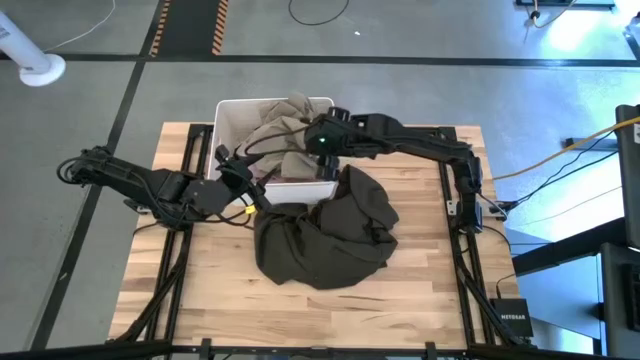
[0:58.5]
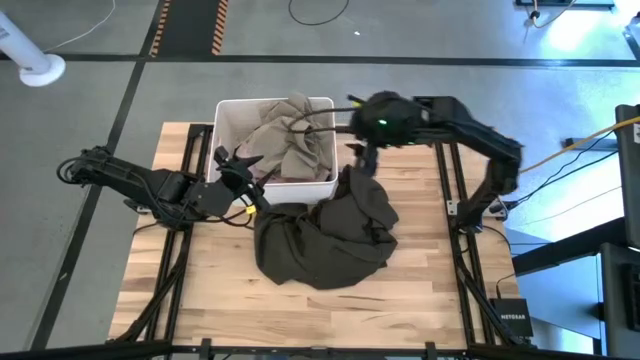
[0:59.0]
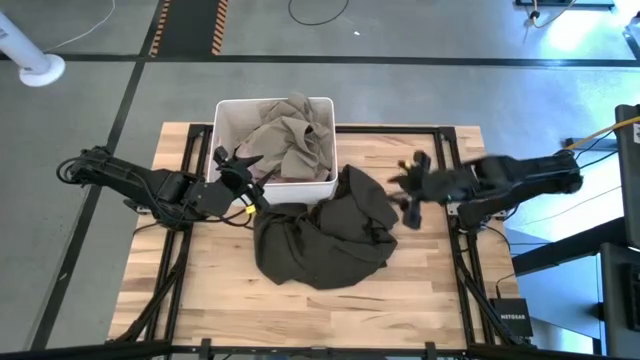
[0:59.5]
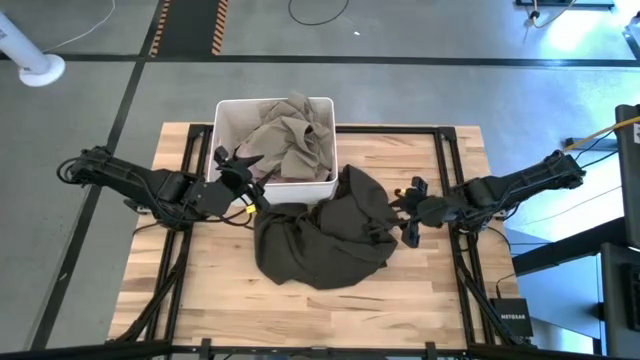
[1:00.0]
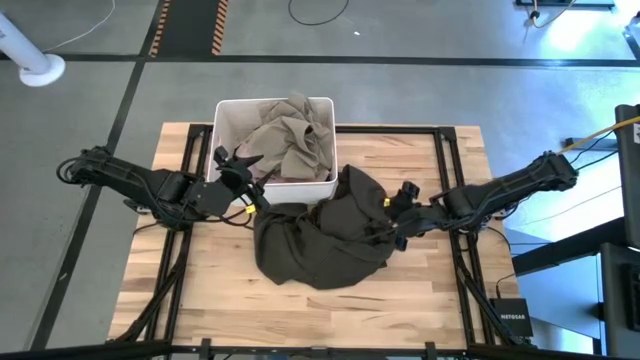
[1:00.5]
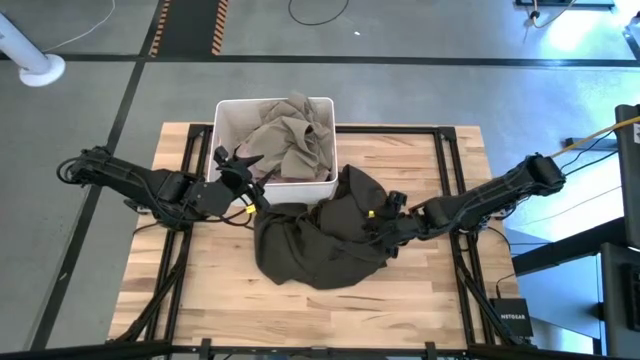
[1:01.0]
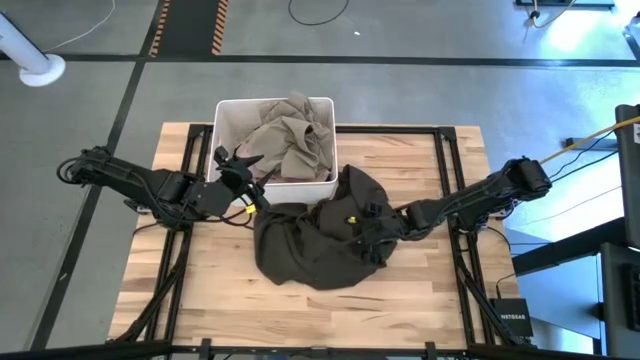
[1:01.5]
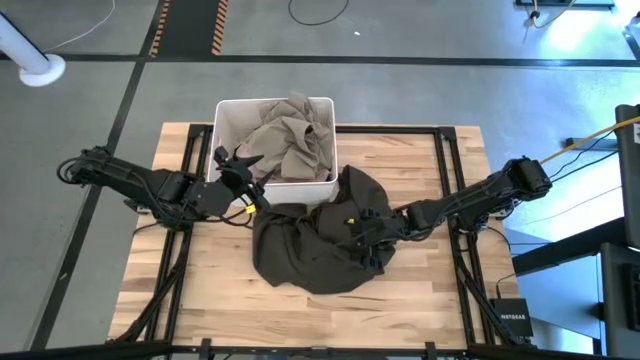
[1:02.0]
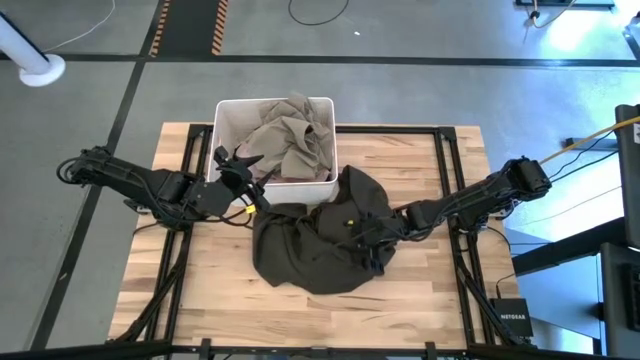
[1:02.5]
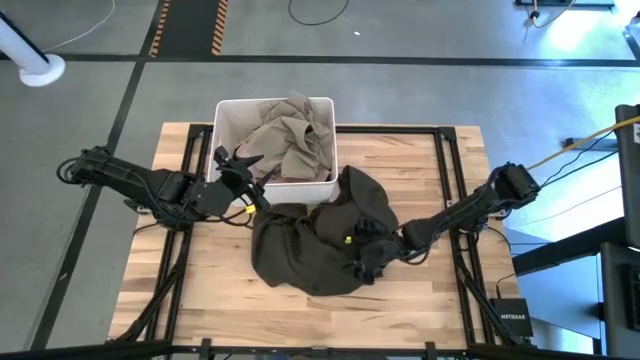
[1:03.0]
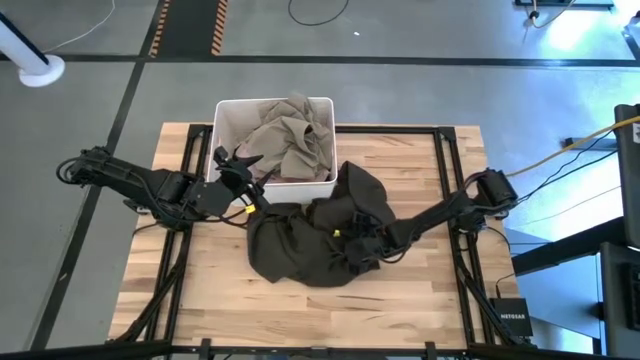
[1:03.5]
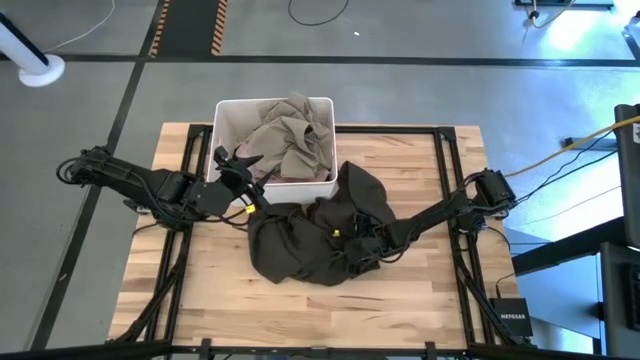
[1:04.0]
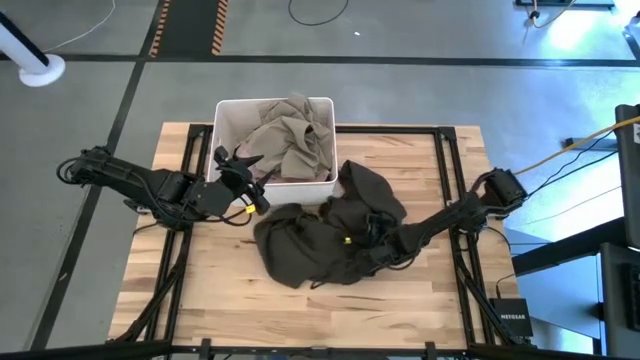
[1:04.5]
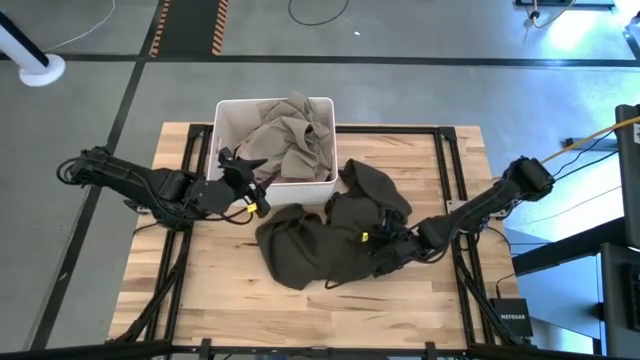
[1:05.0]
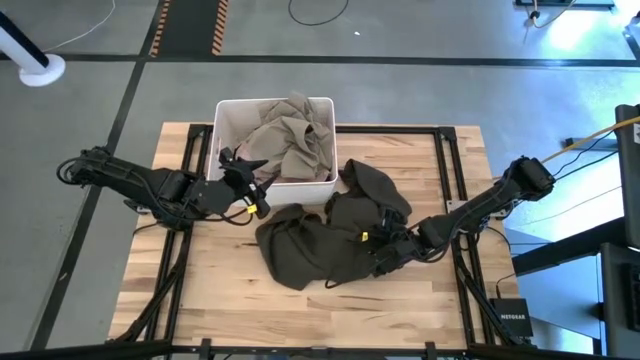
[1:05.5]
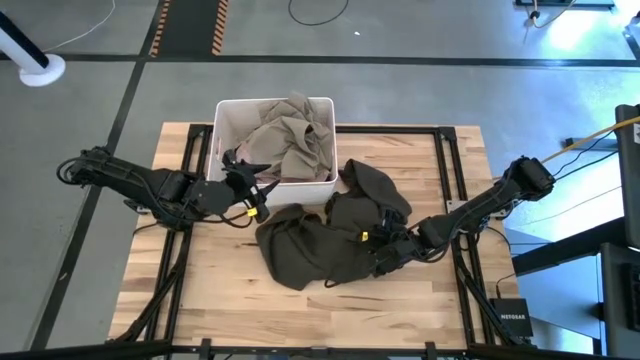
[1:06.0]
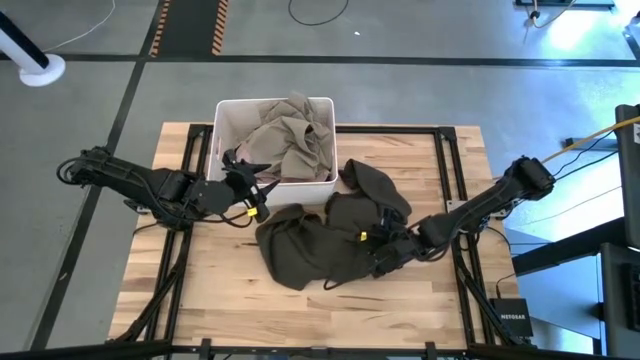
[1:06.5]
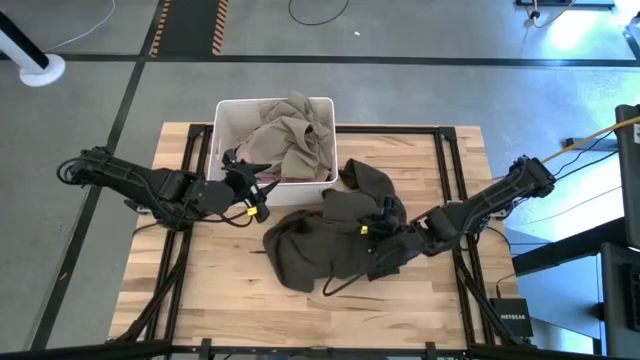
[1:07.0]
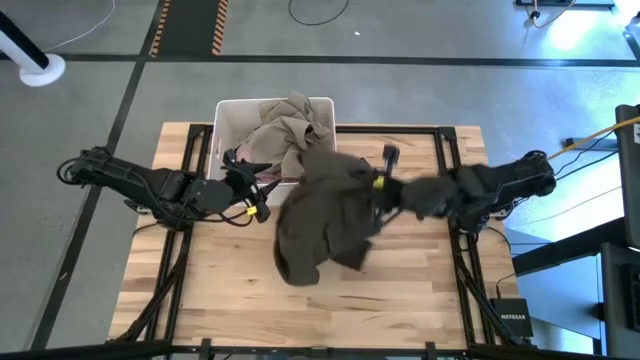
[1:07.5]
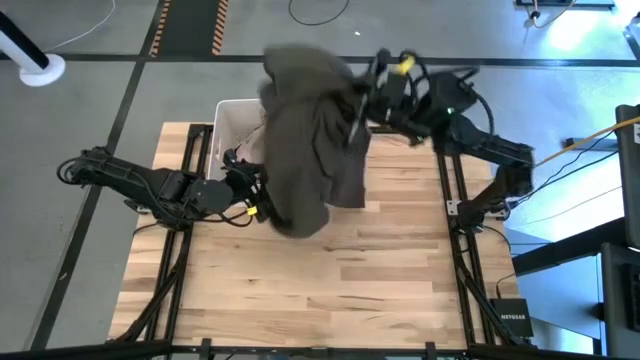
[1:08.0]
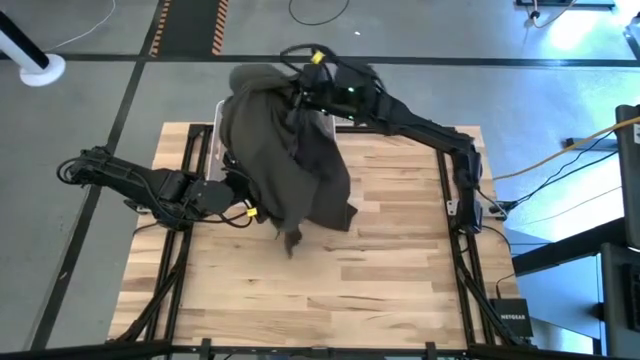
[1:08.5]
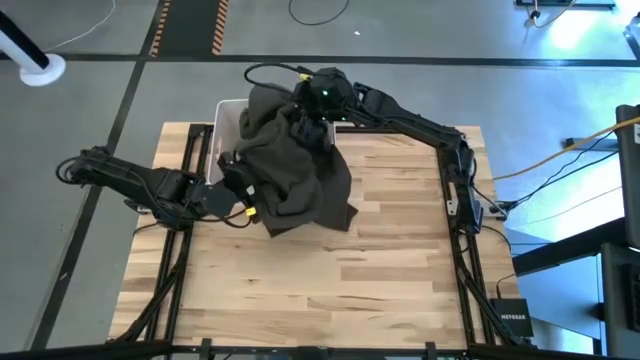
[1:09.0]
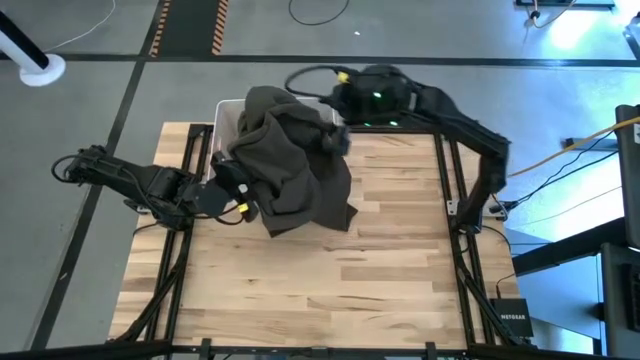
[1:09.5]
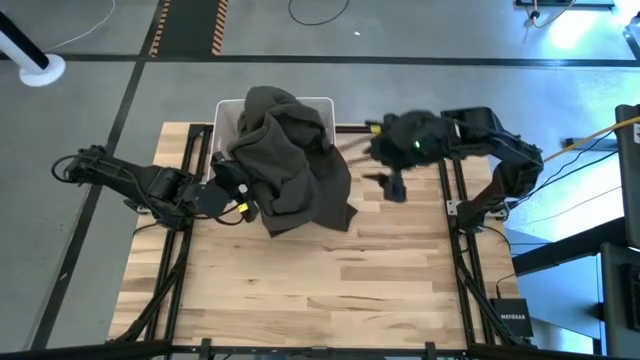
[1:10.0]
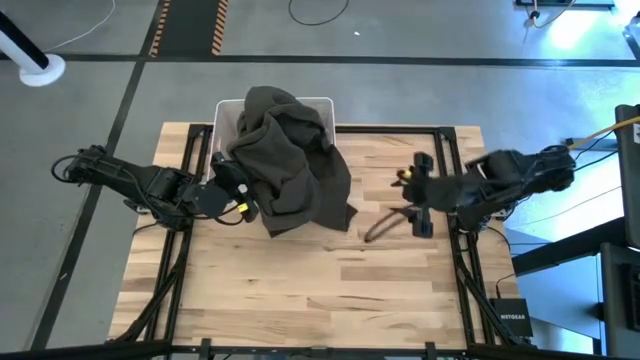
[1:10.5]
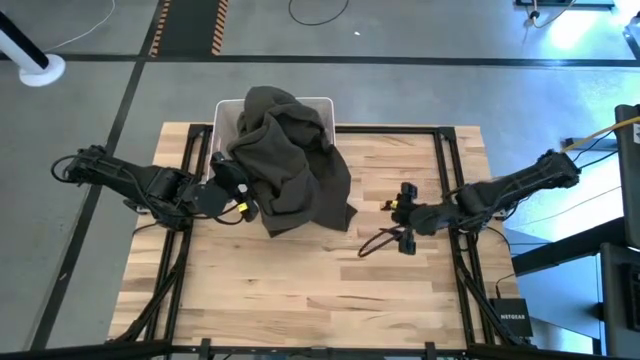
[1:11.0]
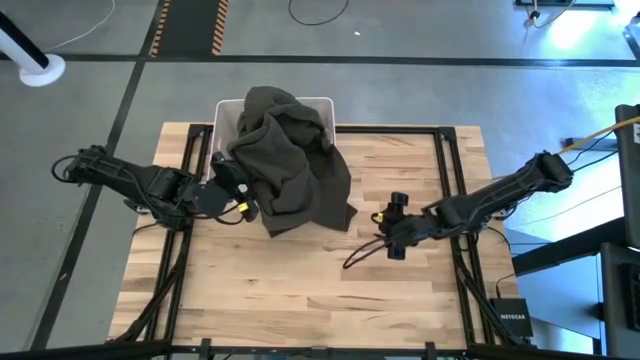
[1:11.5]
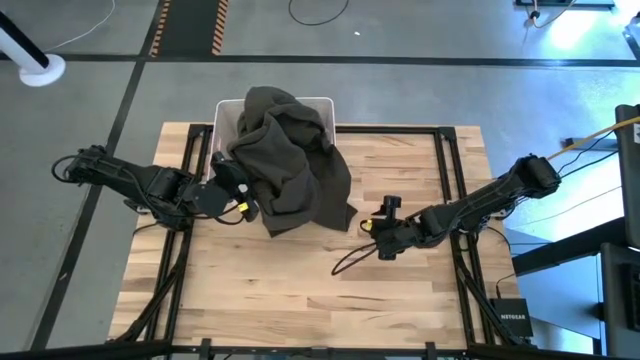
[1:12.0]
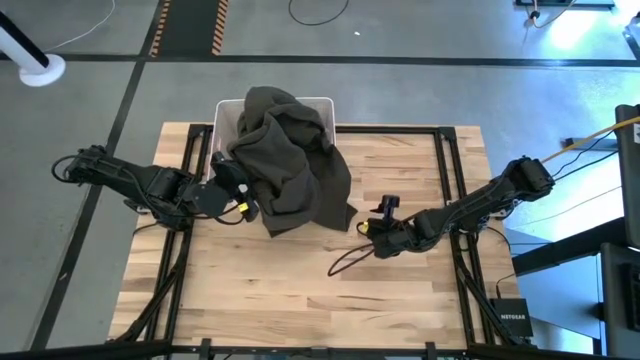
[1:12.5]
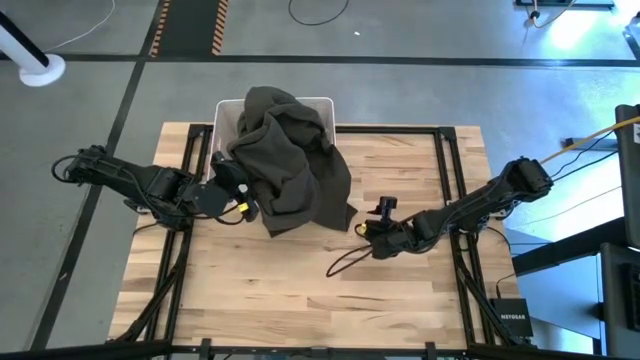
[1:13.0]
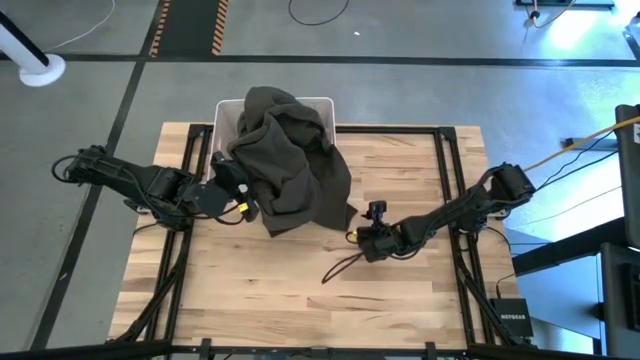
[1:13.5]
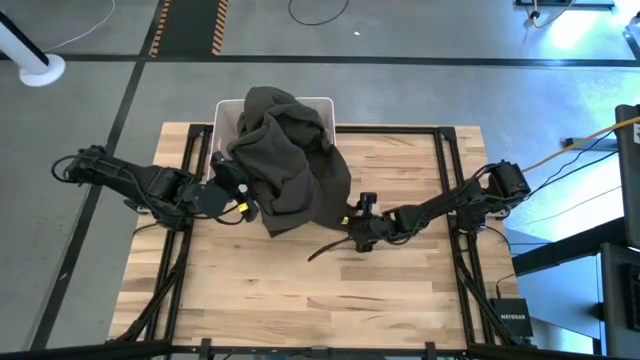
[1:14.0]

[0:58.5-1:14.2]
Task: Sort clothes
Put the gray jacket into the white laundry bin

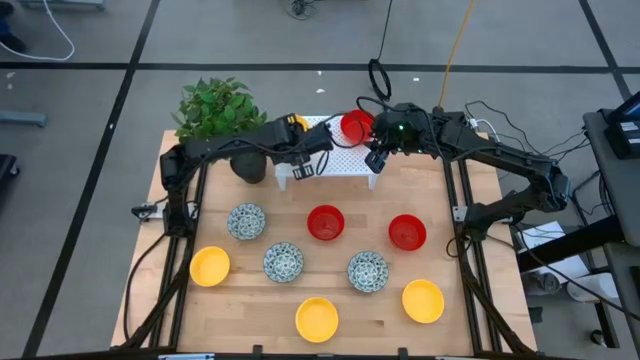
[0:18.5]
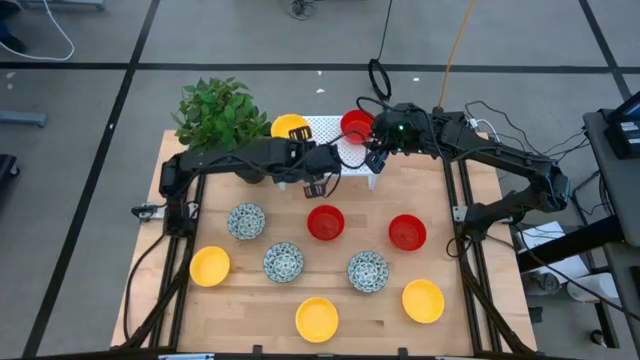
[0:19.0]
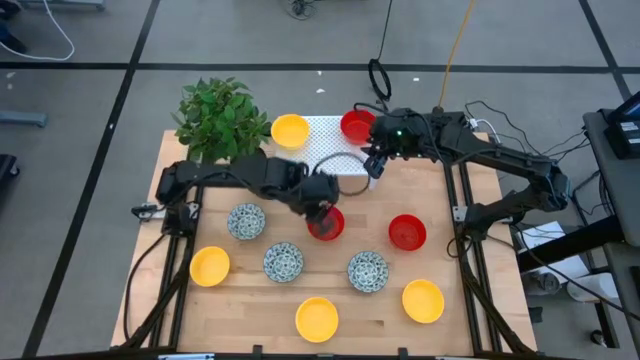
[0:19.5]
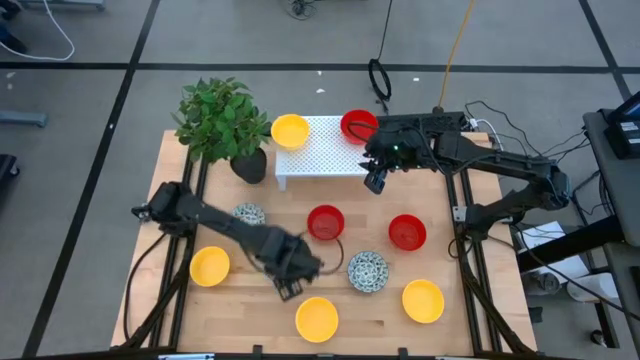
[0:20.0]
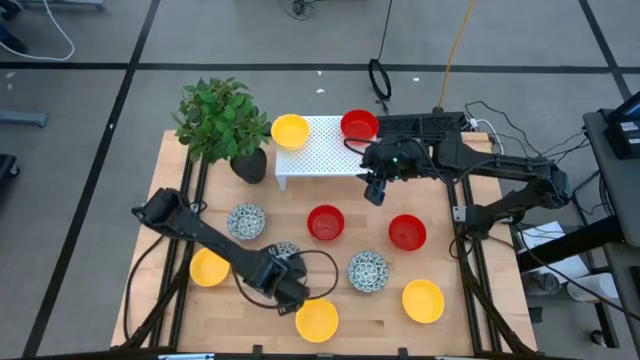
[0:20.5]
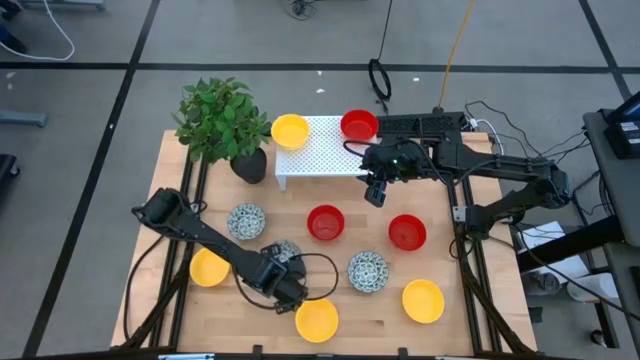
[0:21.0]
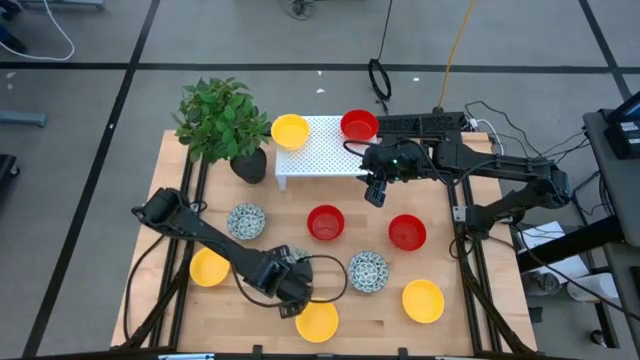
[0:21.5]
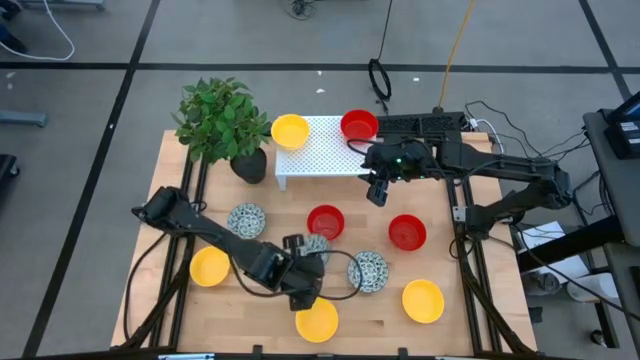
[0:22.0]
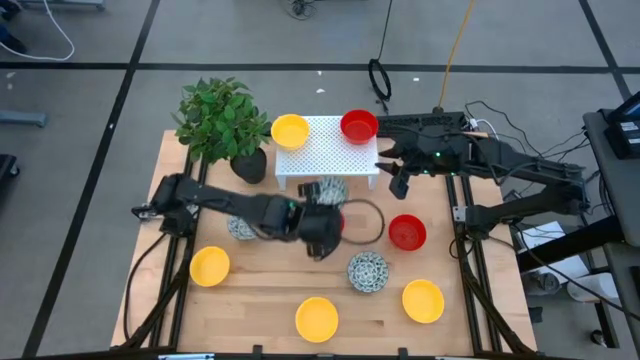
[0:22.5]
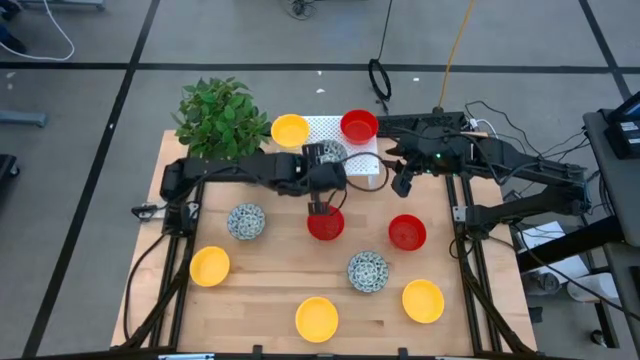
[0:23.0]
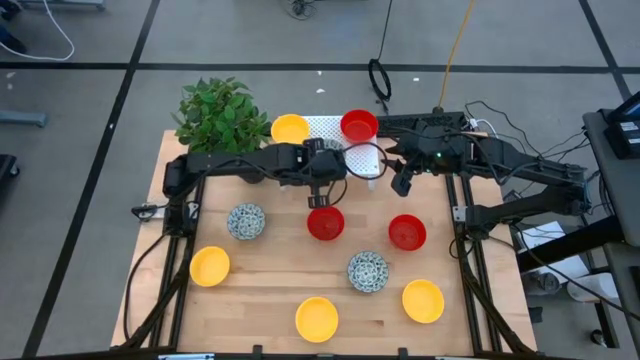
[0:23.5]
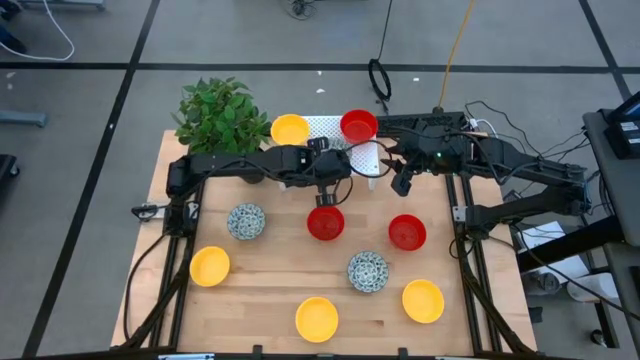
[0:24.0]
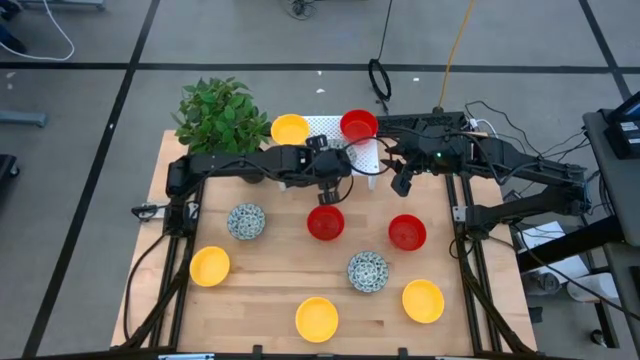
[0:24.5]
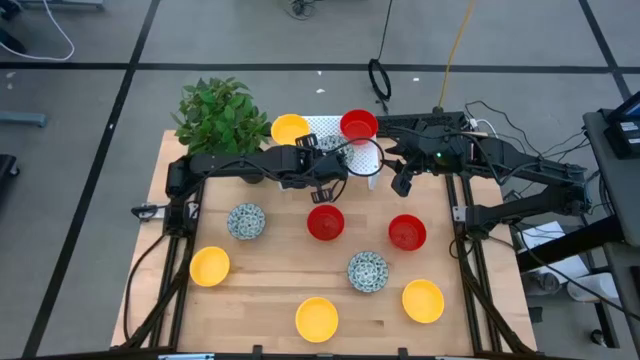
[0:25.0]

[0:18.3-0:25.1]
Task: Pick & Place Mini bowls
Put the blue patterned bowl on the shelf
